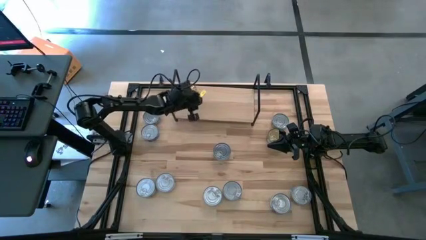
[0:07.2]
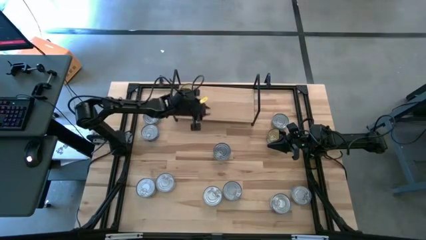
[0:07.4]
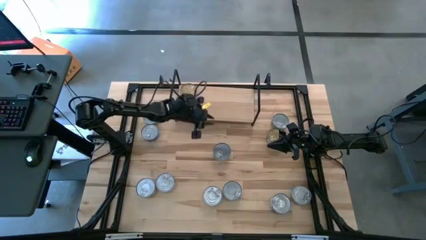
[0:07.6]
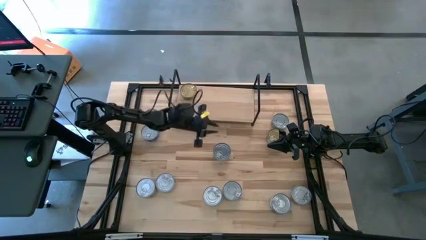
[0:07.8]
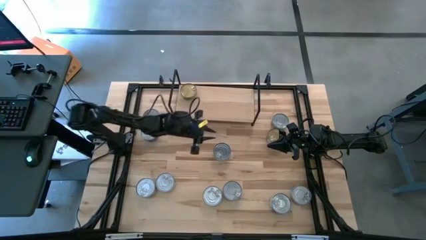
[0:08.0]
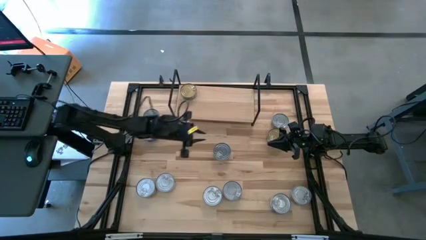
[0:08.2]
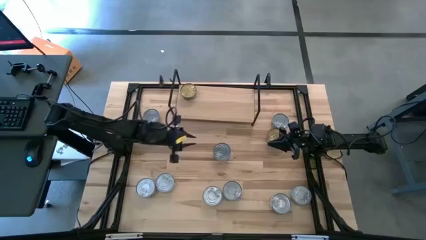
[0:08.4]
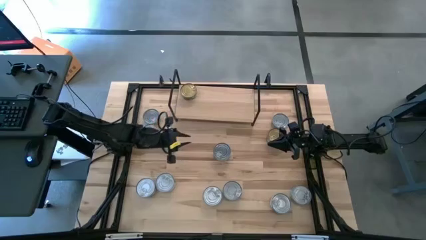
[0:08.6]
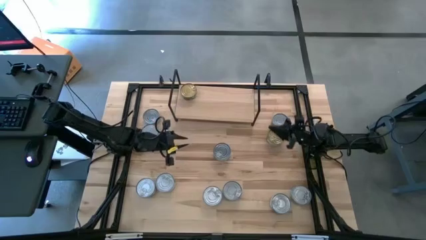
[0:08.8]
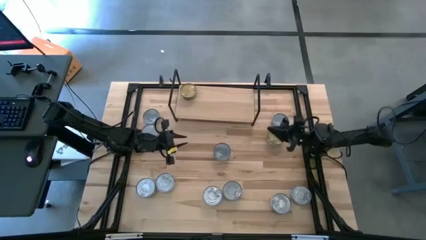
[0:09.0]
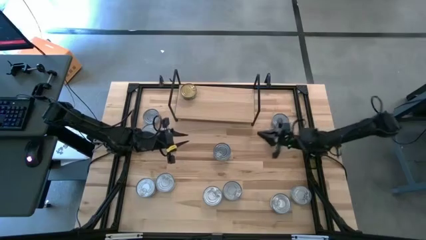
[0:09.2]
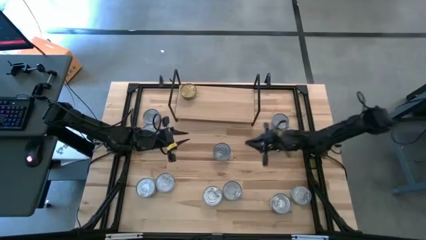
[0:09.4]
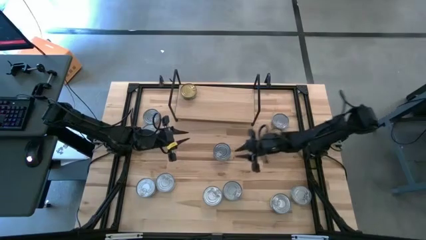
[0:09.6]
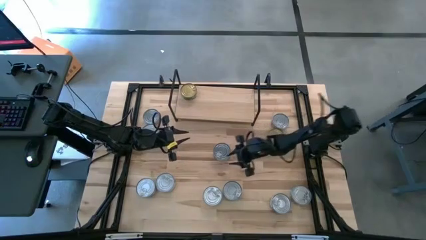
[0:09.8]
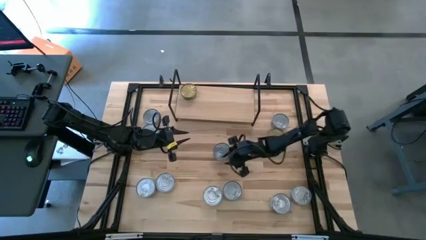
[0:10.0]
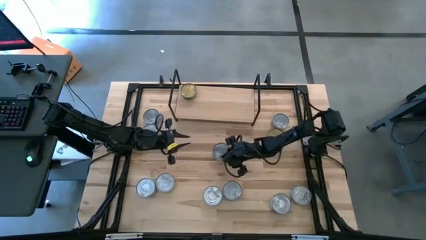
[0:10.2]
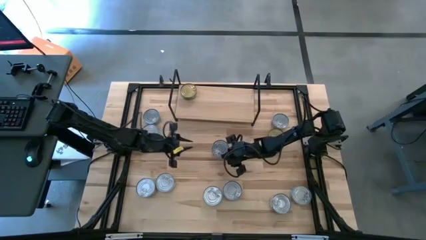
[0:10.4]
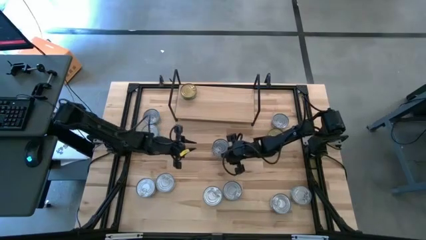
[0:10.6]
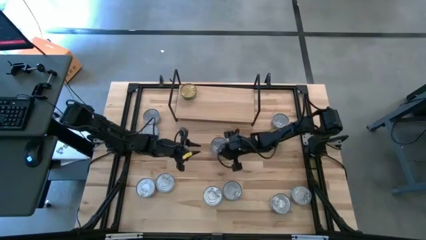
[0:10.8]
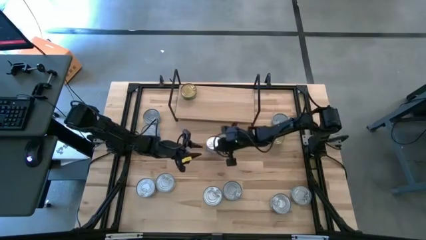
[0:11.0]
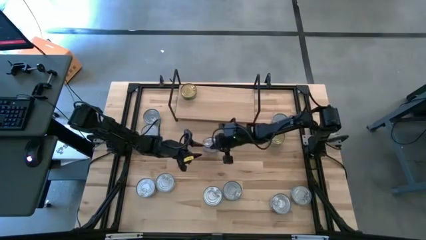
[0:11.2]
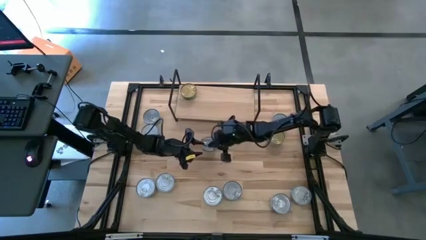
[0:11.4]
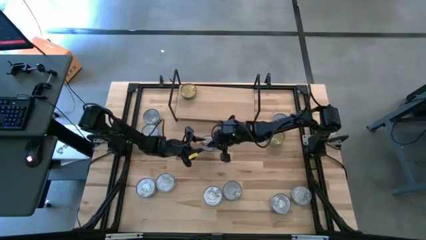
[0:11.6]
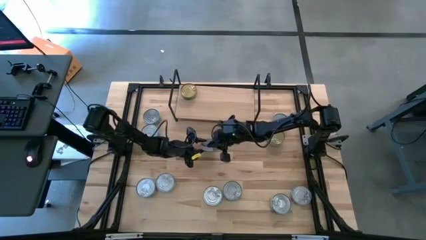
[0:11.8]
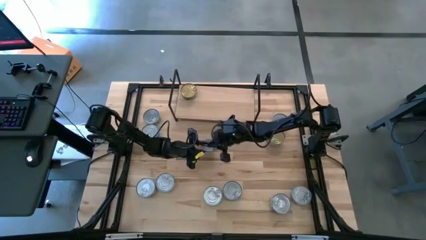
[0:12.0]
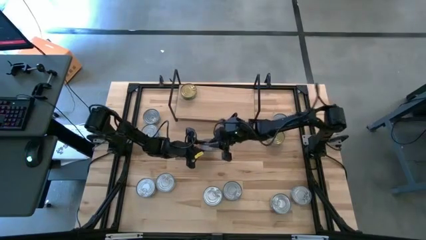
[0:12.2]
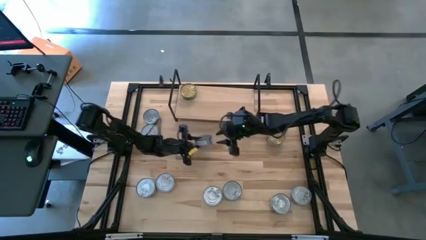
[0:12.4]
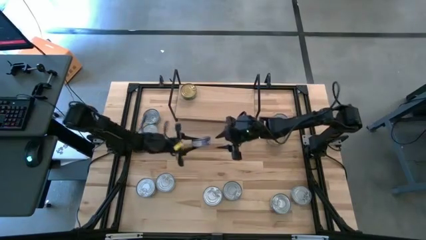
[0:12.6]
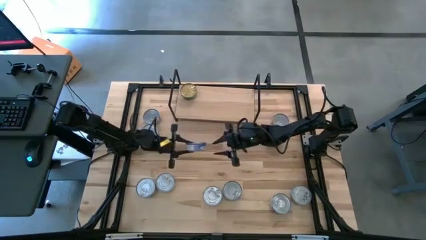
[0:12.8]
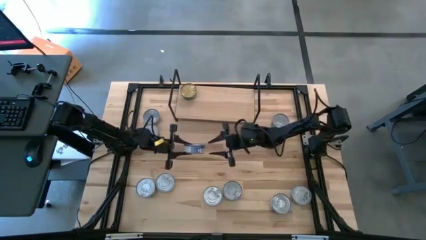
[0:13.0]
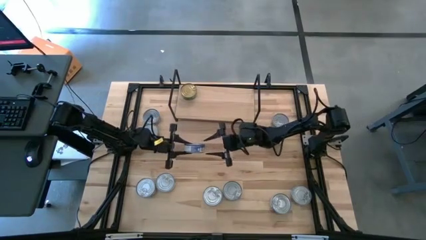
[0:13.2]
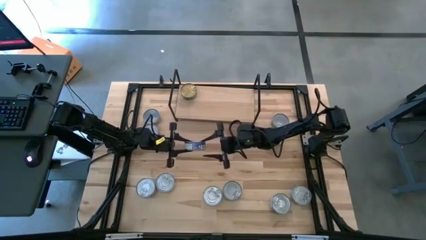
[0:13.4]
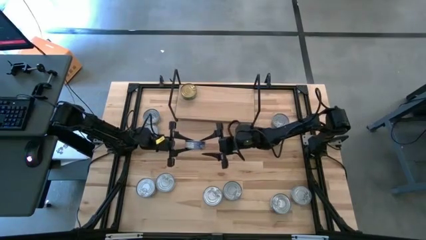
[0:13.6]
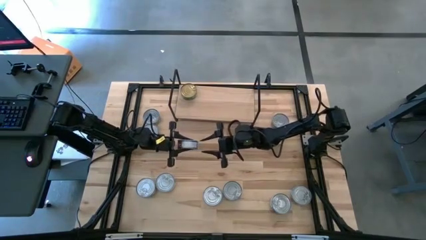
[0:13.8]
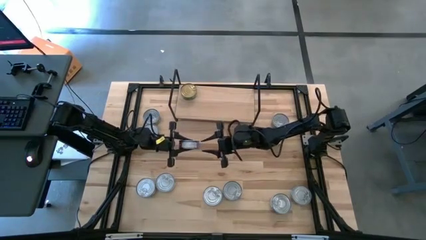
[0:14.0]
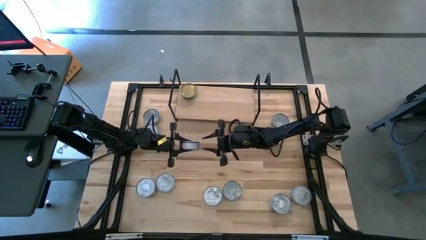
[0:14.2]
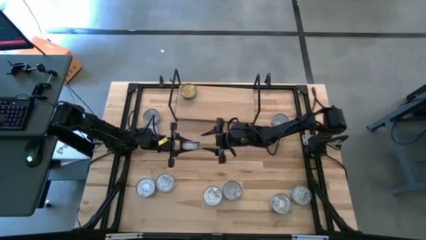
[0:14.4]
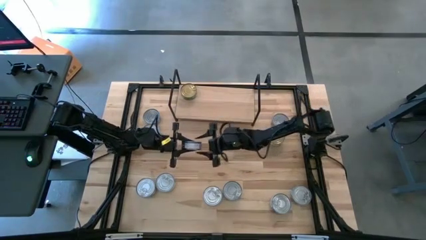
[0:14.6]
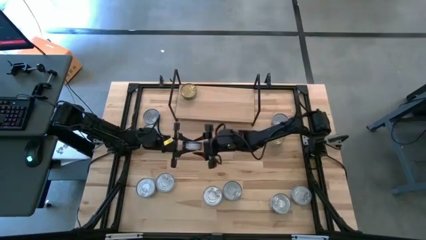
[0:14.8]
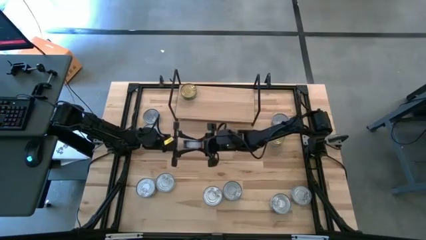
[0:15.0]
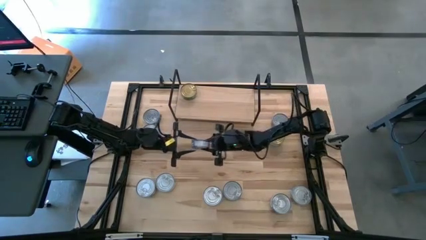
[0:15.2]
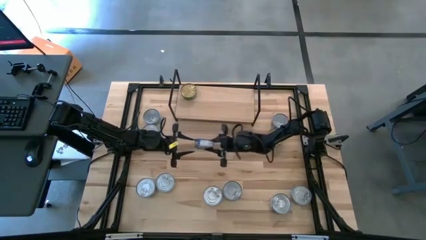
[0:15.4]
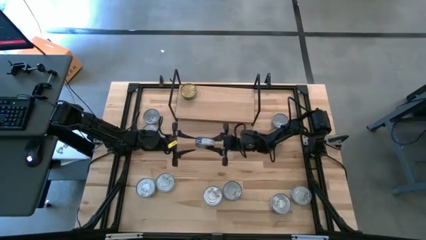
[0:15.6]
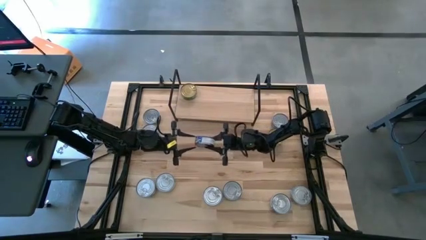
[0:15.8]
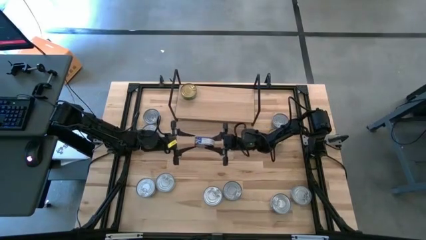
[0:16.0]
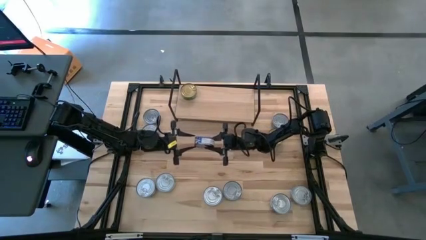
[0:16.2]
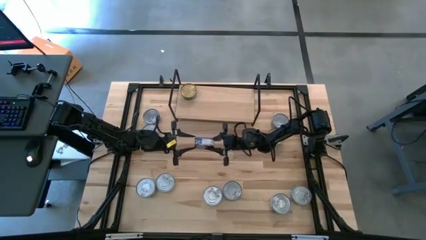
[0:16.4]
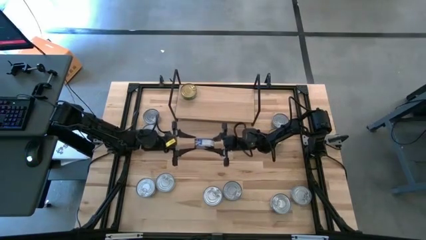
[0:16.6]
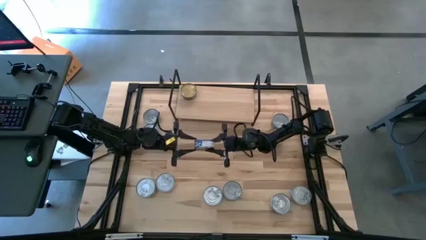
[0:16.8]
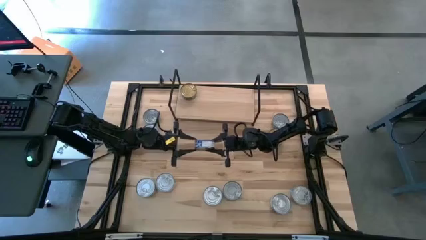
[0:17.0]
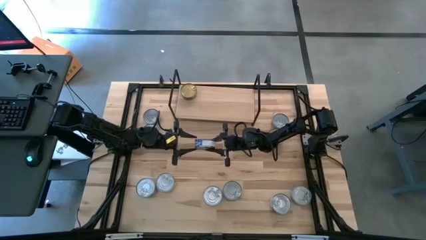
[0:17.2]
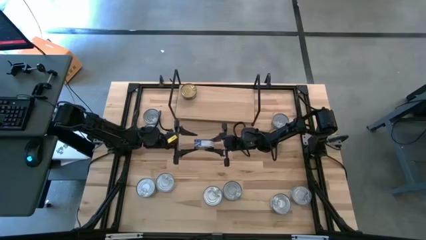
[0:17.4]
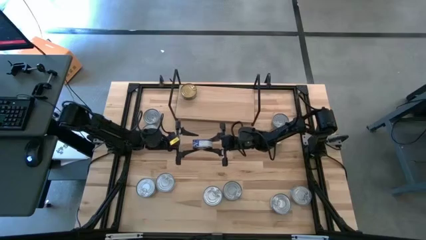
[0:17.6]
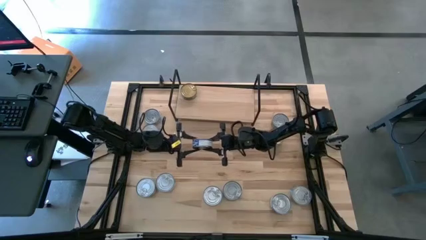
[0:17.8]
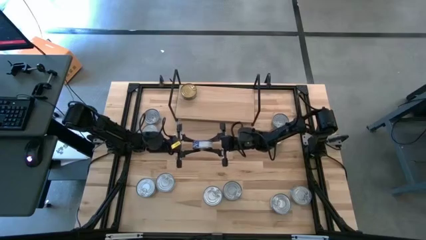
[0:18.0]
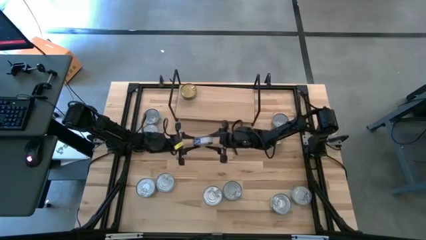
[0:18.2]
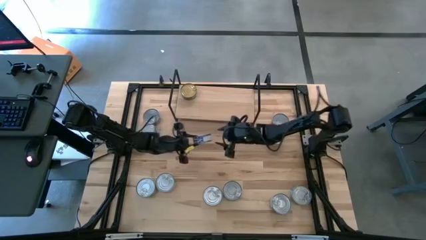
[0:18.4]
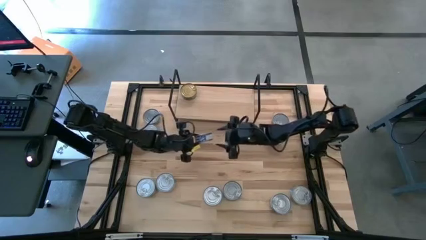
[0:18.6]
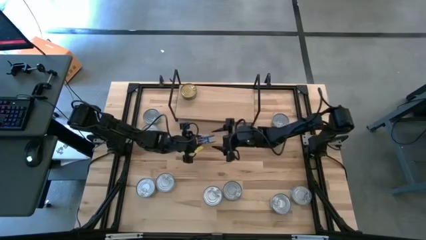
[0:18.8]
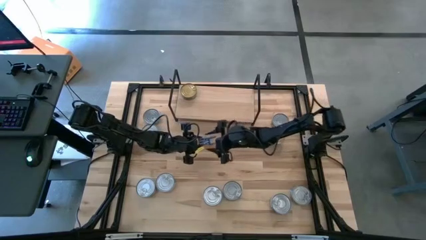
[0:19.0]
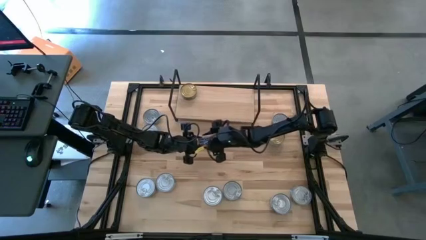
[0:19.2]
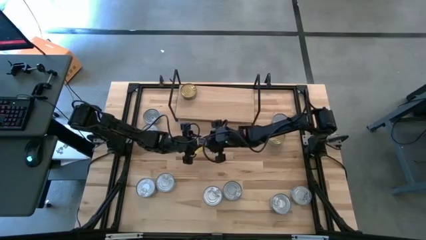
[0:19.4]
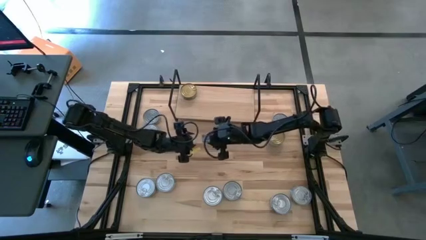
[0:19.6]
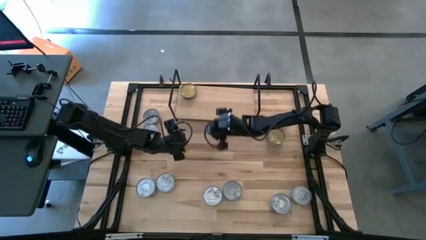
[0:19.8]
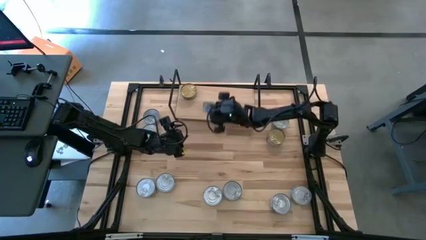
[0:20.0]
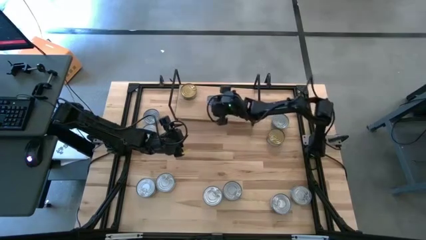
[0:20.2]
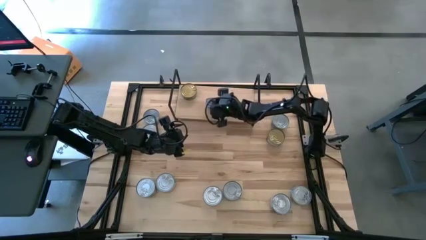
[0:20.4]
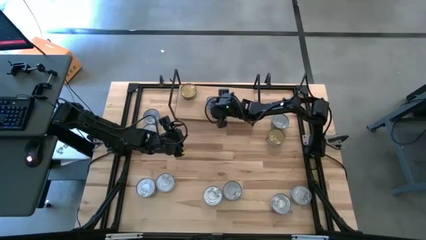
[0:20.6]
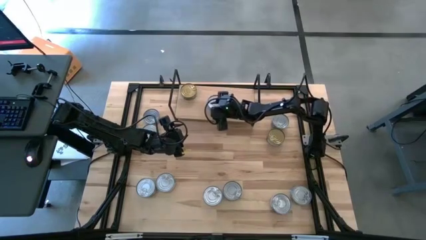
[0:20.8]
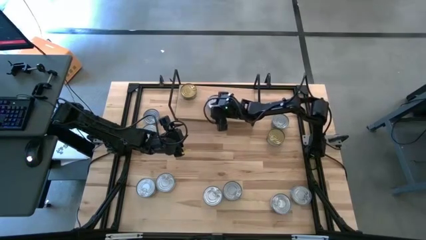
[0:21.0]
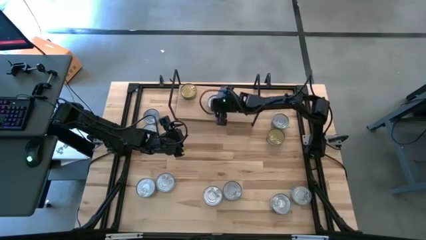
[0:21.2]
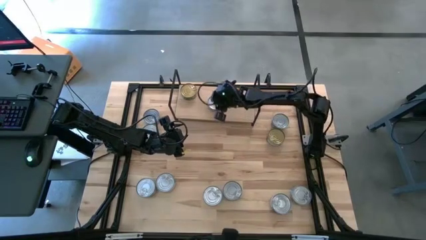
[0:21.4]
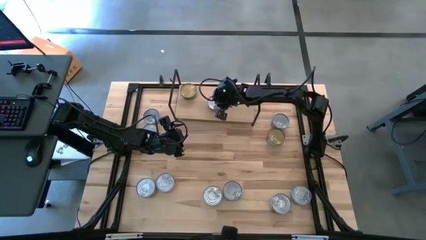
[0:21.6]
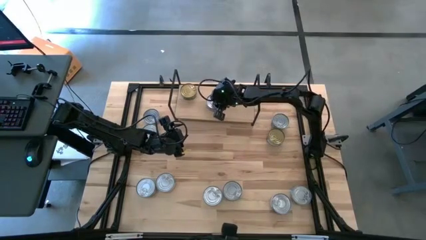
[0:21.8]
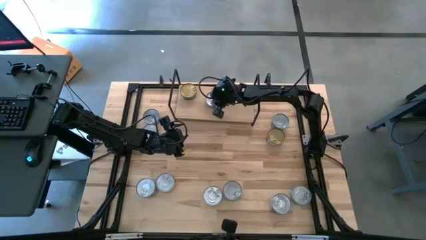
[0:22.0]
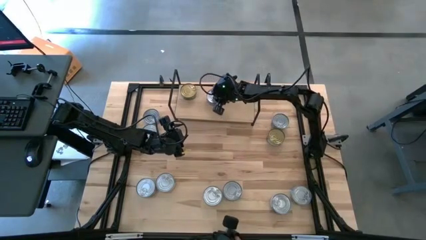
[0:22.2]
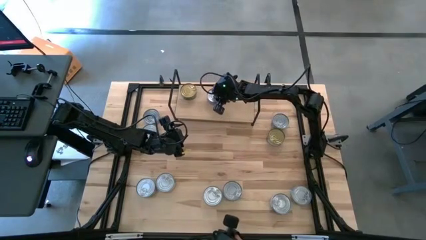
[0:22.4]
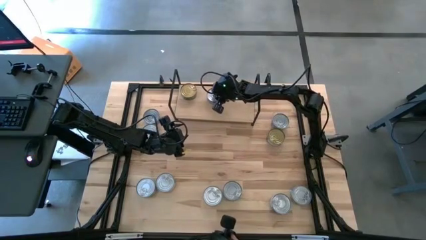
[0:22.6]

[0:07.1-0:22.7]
Task: Stack canned seafood by type on shelf
Put the blue tuna can on the shelf
